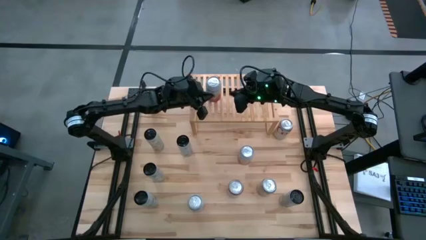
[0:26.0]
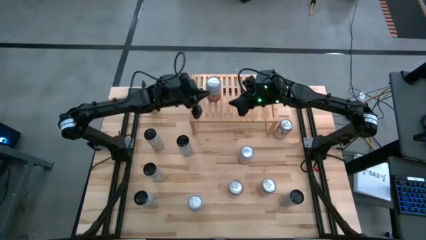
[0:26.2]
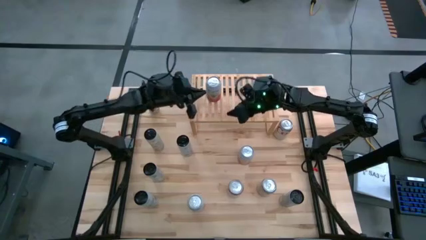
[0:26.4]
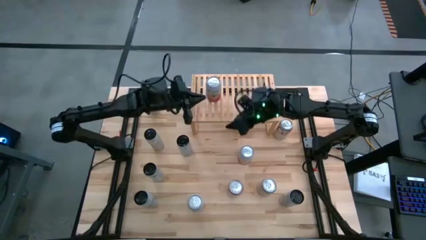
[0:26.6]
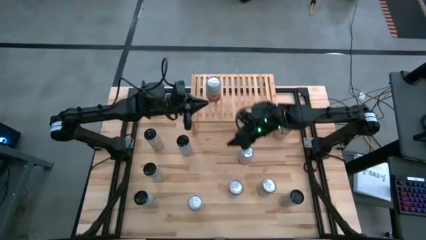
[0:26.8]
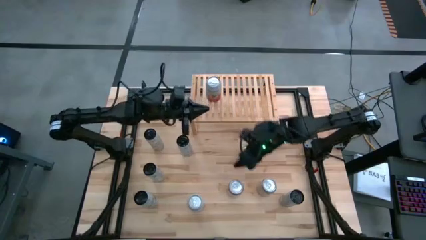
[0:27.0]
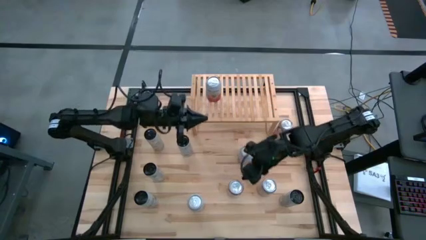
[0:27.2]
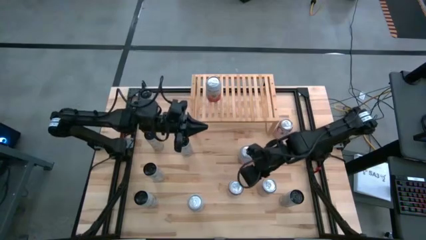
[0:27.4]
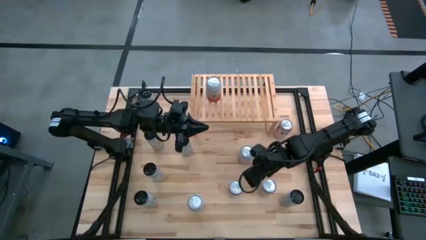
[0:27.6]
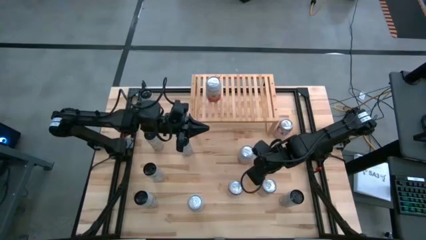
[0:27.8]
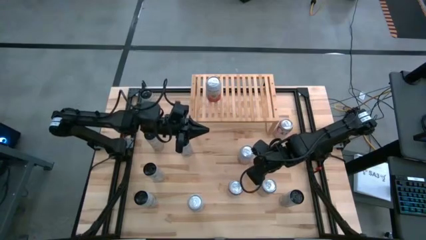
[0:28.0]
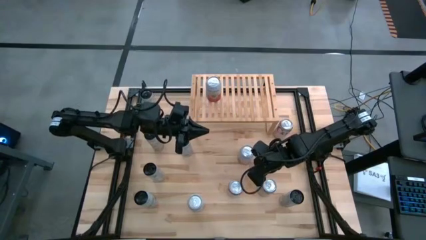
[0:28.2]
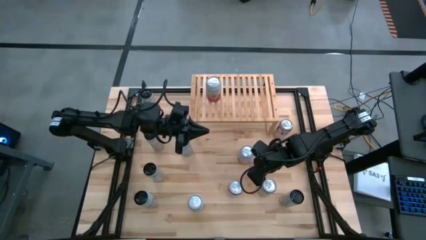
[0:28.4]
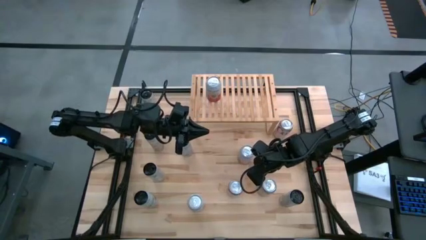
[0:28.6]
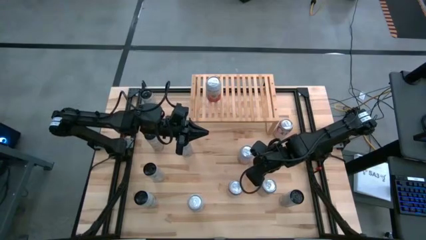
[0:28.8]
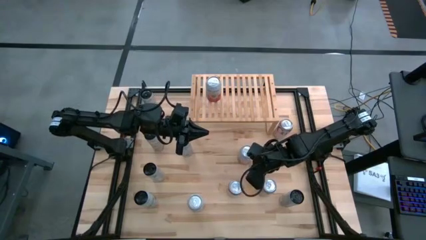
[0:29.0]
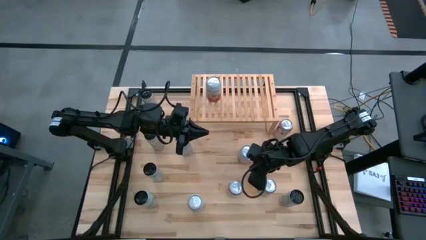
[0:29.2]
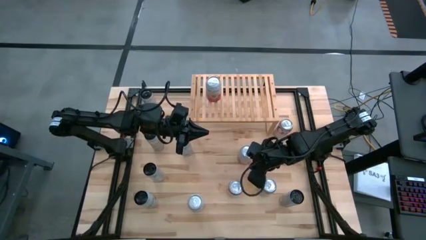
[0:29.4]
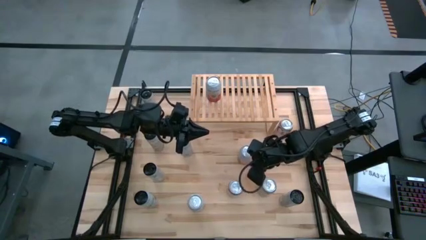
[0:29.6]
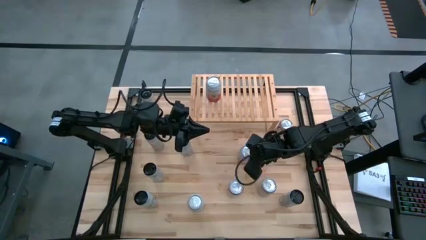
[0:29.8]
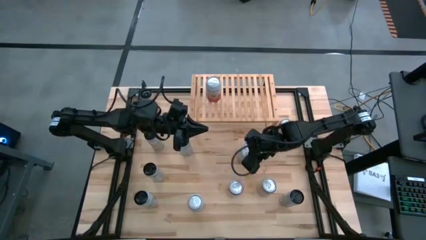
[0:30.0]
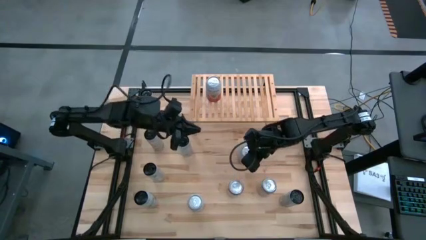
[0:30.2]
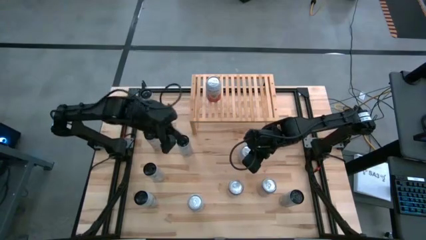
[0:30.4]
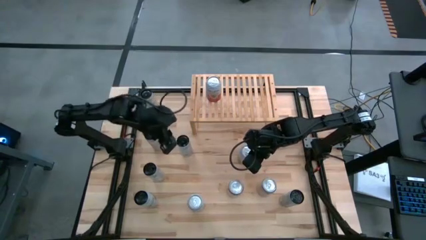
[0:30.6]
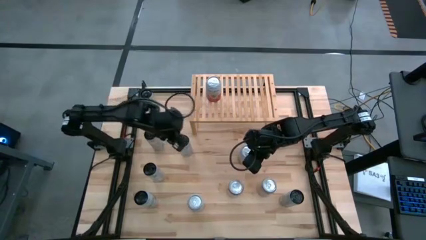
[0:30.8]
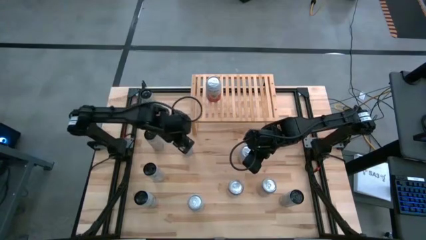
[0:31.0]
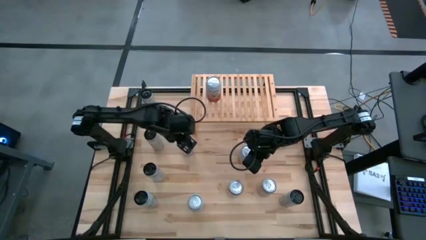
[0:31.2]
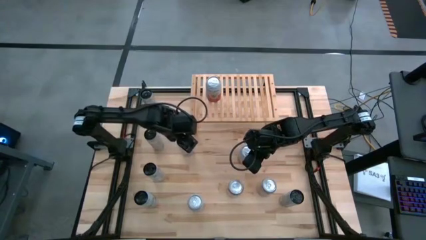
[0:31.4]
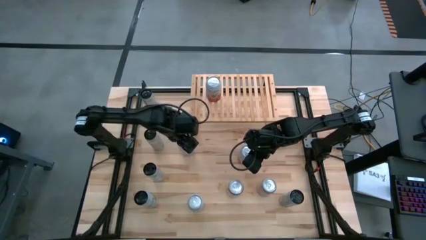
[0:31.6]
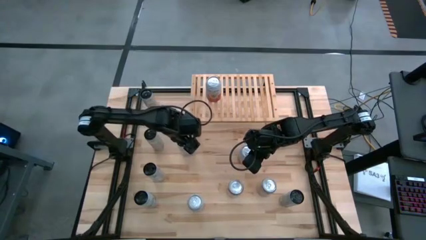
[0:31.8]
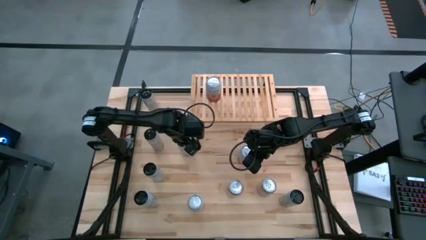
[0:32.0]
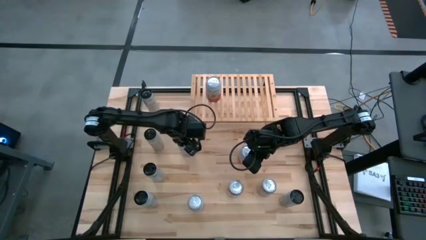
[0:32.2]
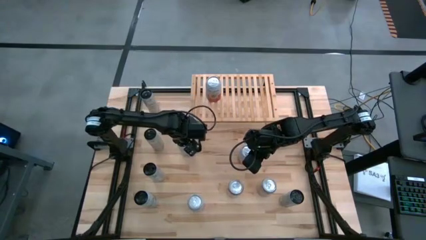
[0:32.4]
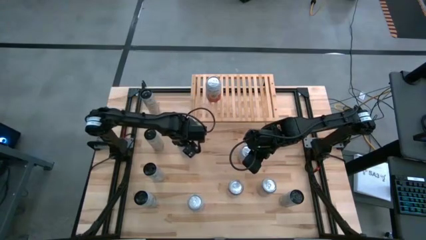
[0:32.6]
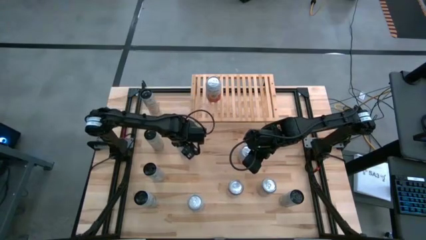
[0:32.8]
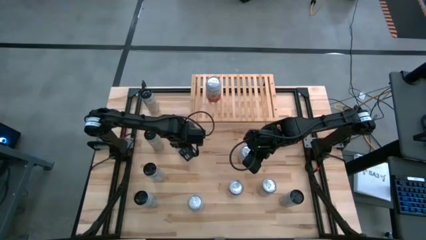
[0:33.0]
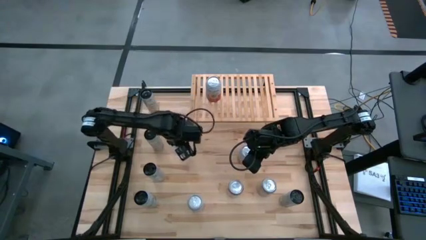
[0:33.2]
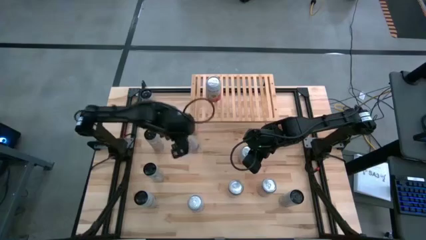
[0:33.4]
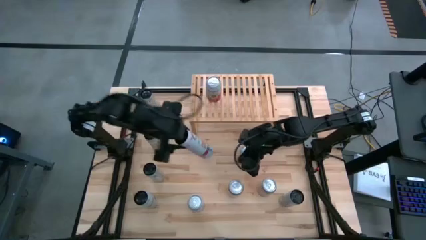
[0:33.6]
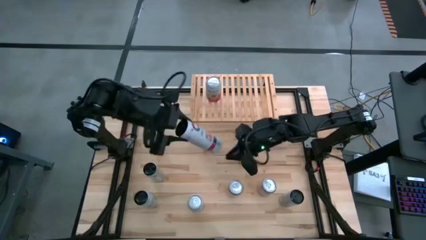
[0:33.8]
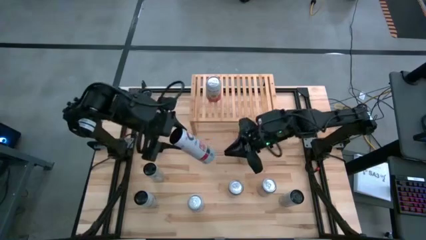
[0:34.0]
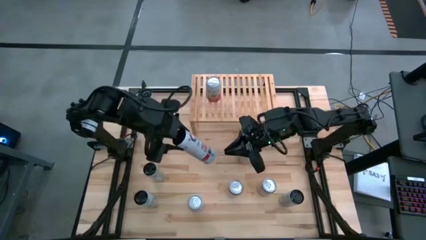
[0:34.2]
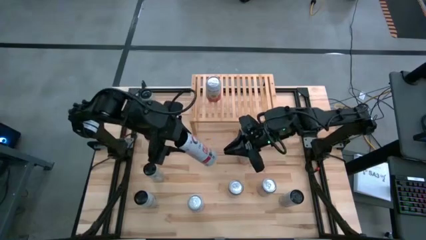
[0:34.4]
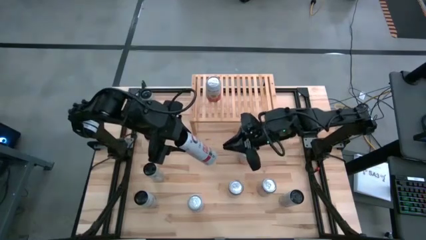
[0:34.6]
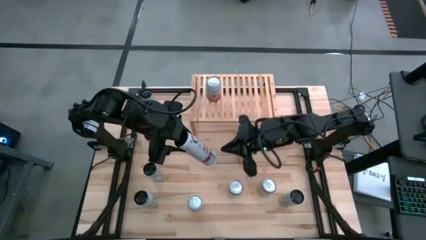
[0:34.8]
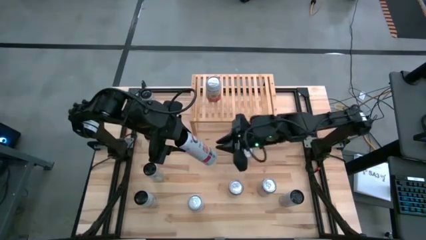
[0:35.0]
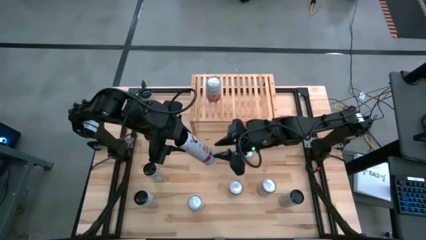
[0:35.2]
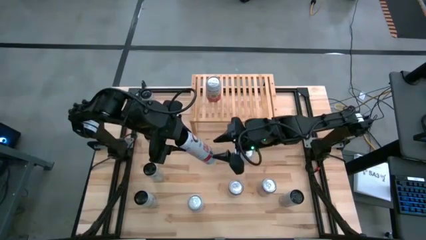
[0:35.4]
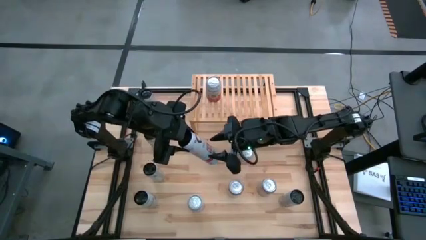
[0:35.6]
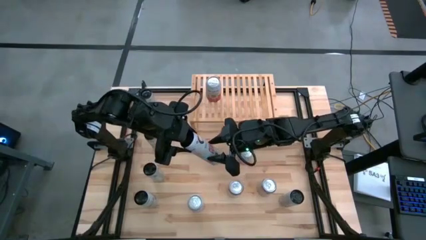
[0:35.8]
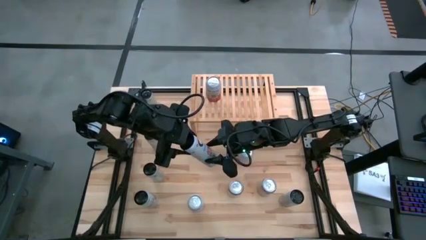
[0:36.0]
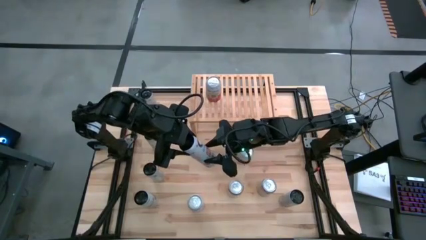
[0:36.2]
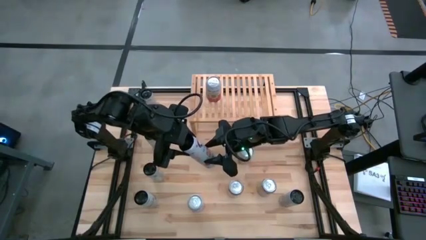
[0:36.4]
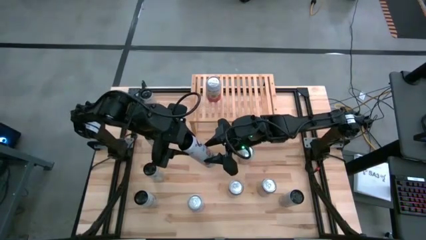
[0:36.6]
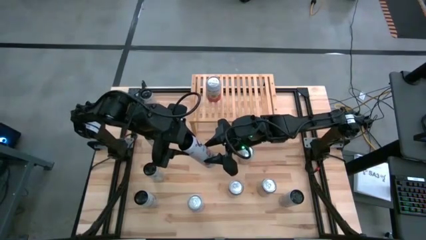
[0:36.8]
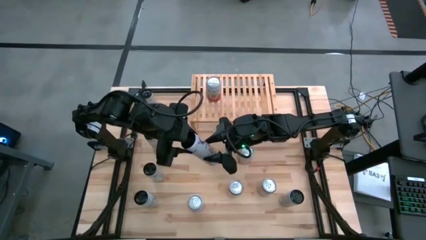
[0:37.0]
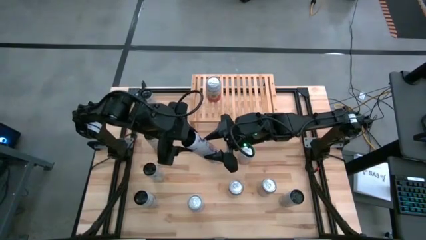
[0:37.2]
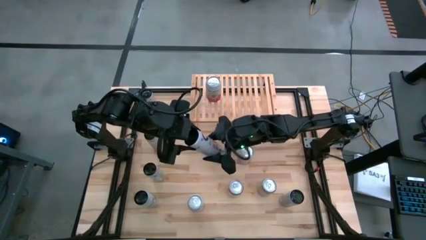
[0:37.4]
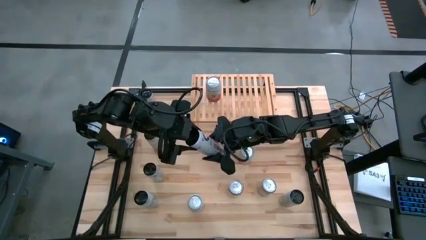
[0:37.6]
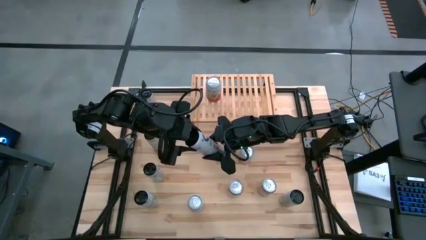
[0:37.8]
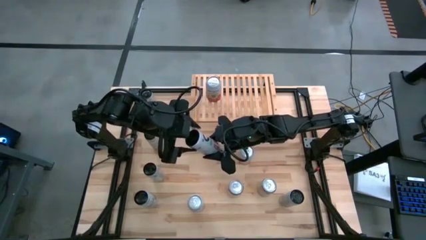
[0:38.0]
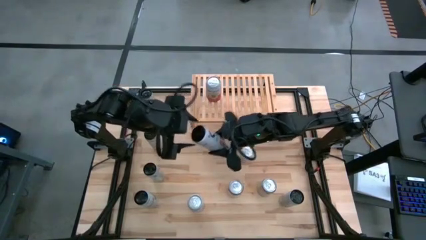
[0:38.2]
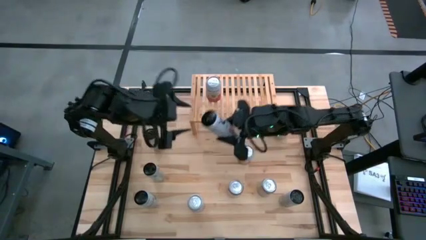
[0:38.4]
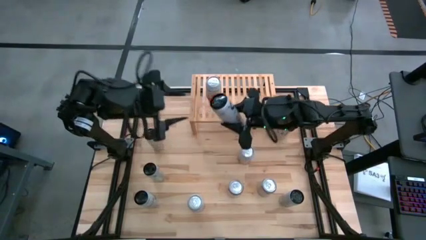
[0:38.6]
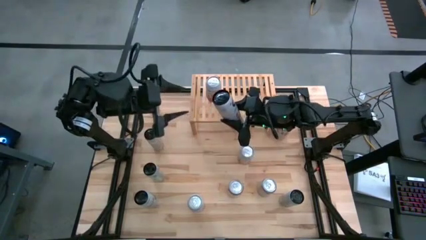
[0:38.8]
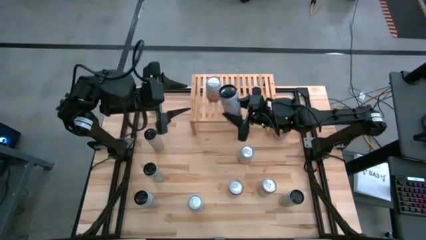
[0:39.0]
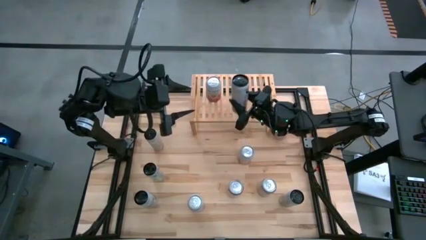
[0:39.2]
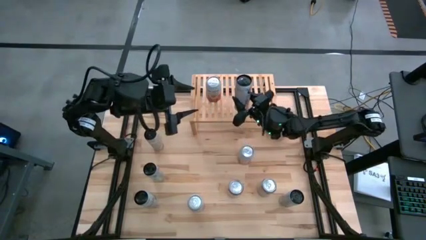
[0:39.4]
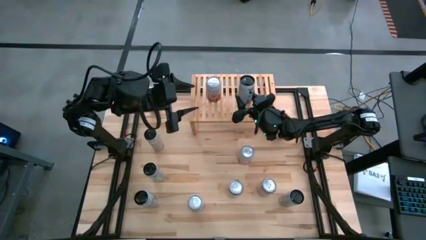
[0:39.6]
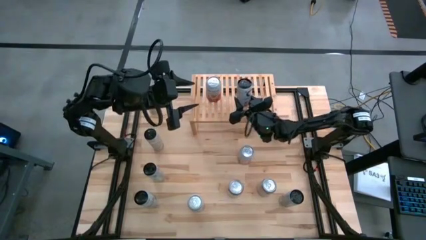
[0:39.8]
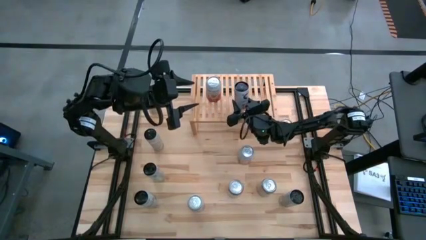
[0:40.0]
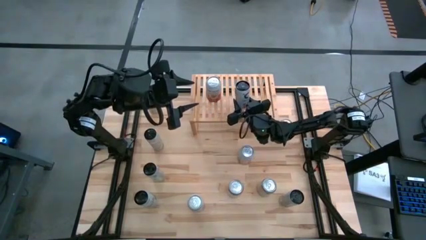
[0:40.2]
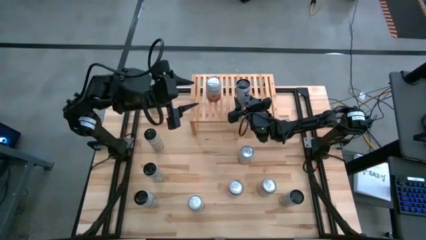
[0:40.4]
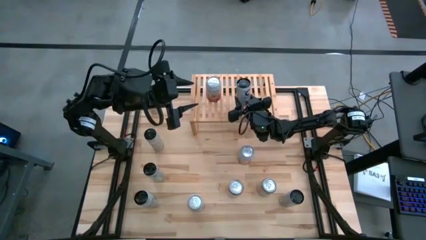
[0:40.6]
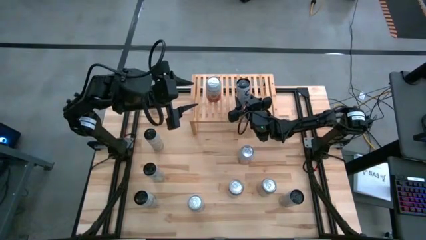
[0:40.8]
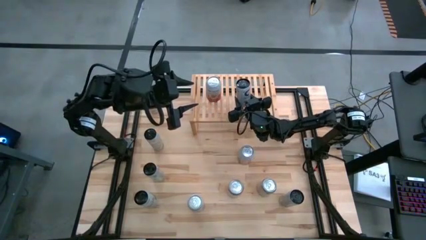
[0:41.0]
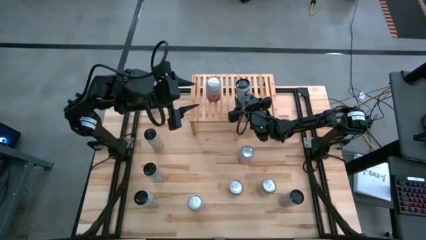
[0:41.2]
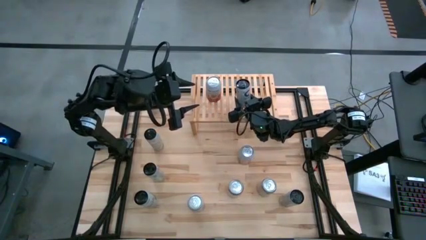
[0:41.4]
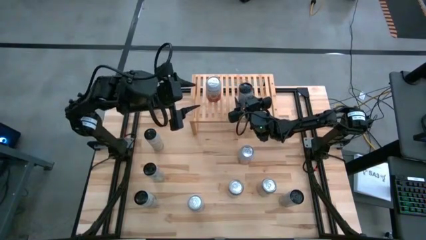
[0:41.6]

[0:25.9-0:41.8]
Task: Place canned beverage on shelf
Put the center white soda can on the shelf
